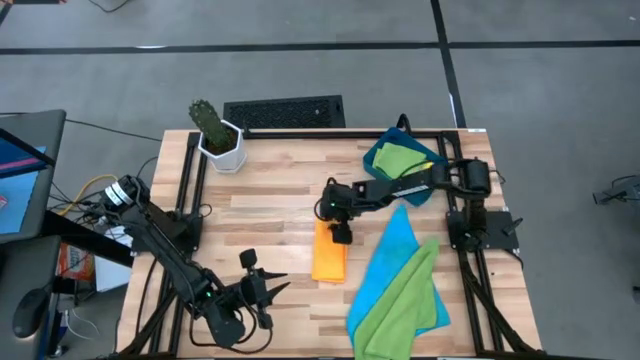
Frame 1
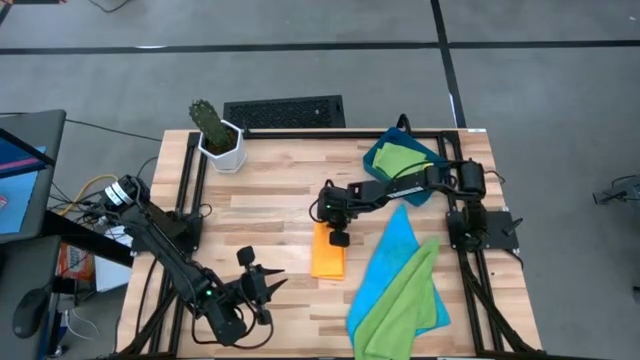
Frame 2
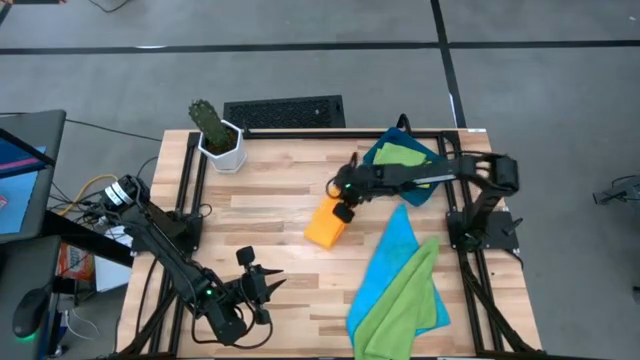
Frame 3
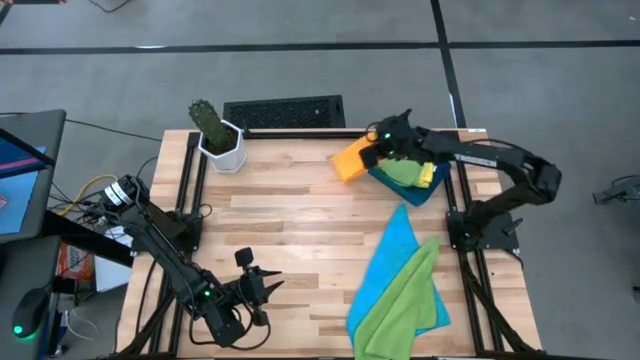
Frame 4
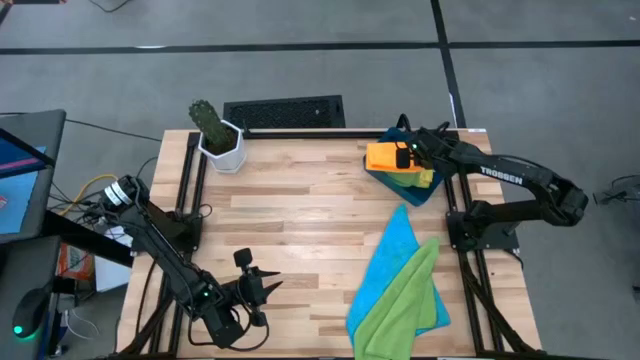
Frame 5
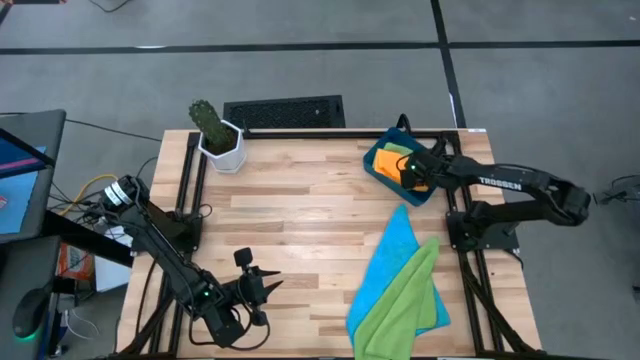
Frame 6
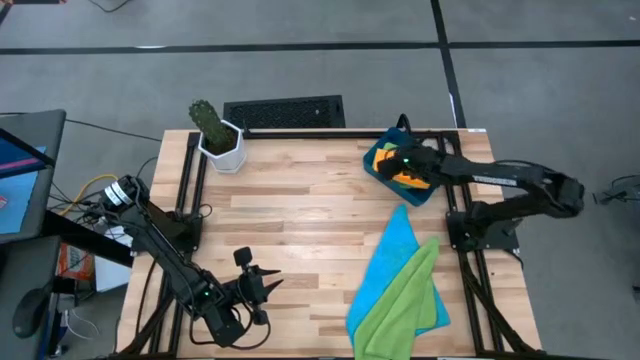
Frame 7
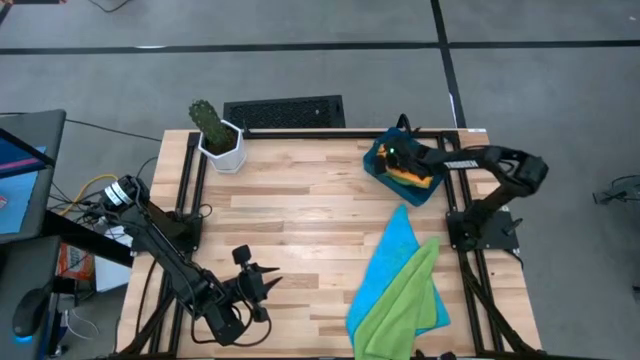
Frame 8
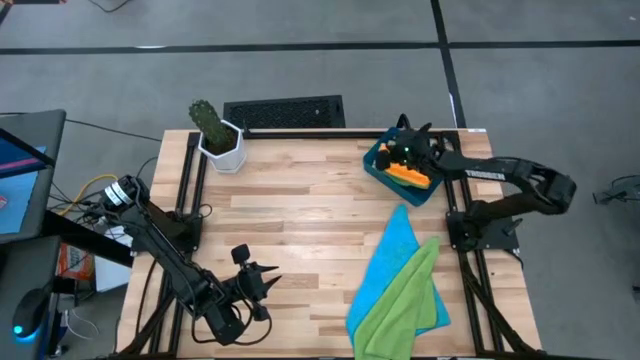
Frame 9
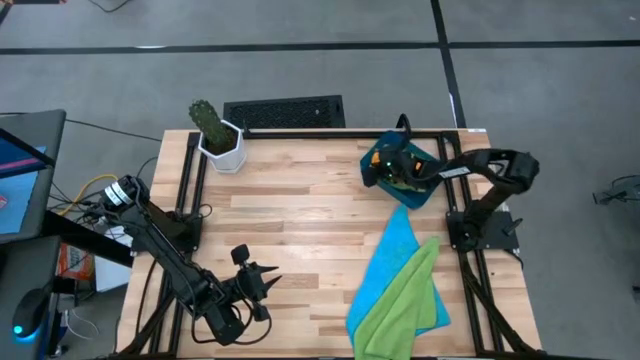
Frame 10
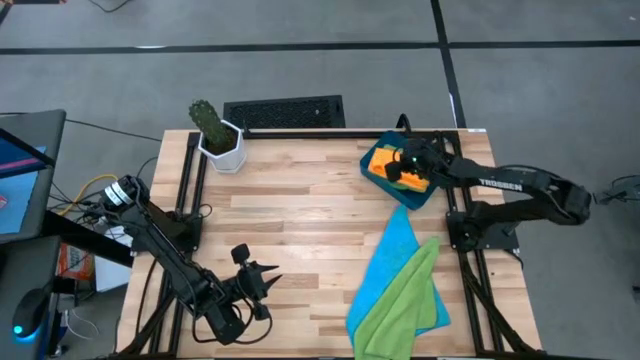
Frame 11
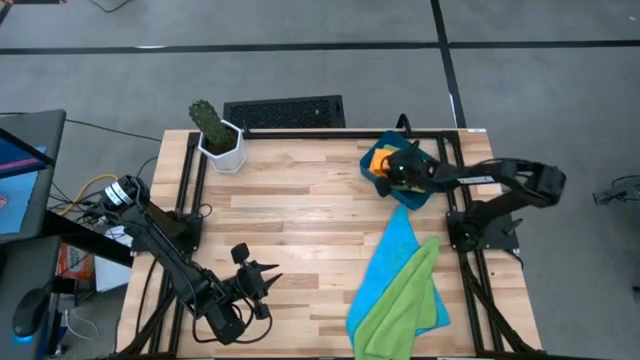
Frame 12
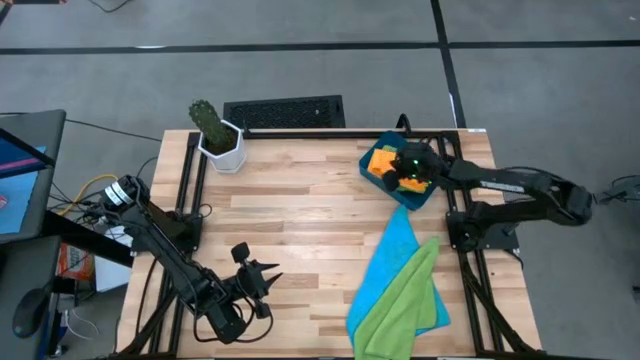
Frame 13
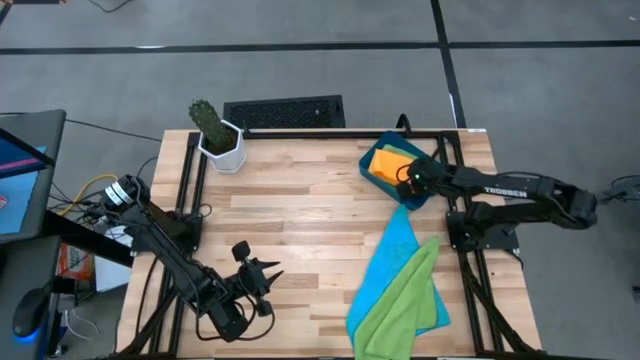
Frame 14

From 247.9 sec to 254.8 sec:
Task: Fold microfiber towels
Put the orange microfiber cloth into the blue bin

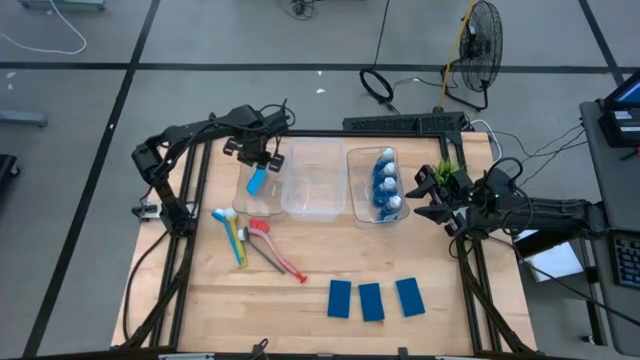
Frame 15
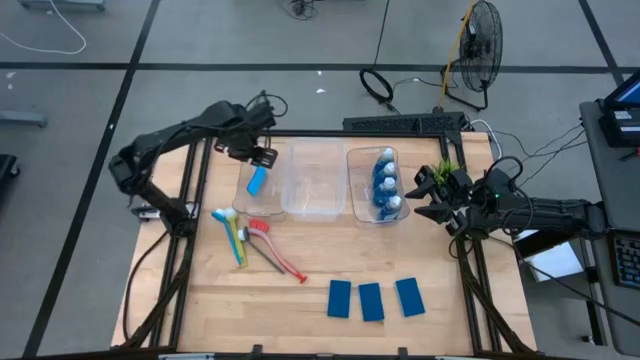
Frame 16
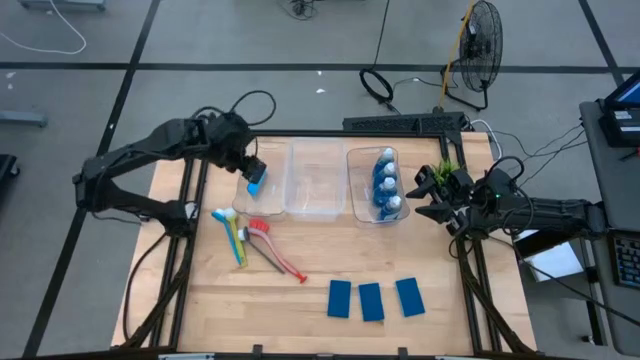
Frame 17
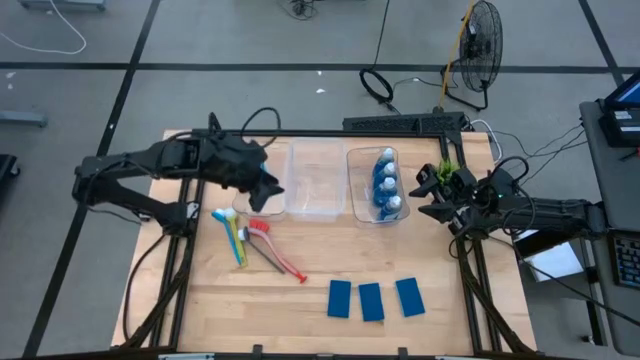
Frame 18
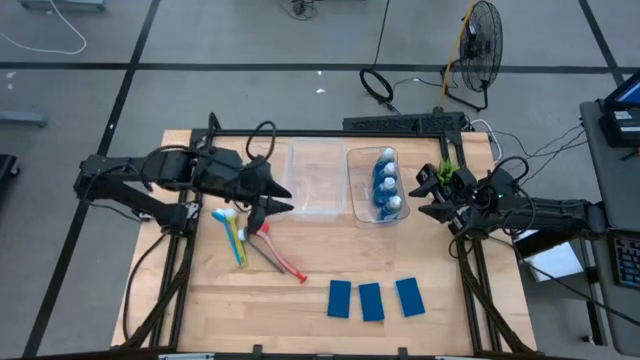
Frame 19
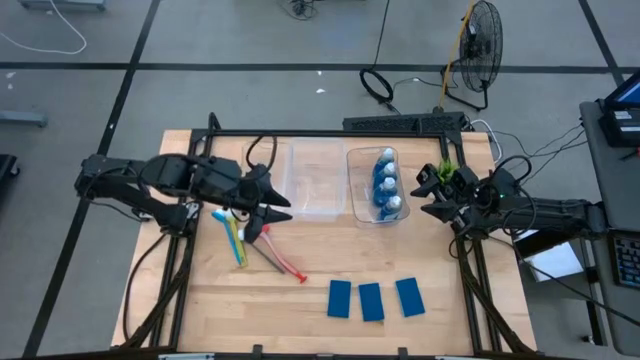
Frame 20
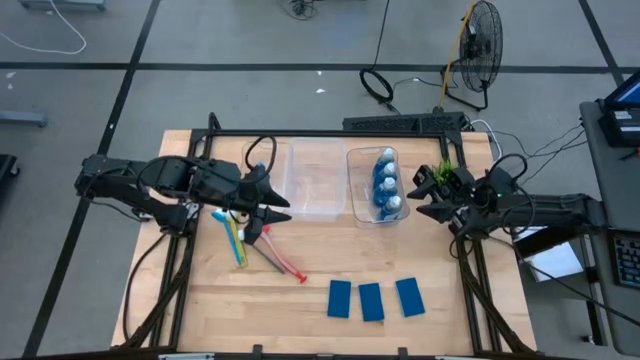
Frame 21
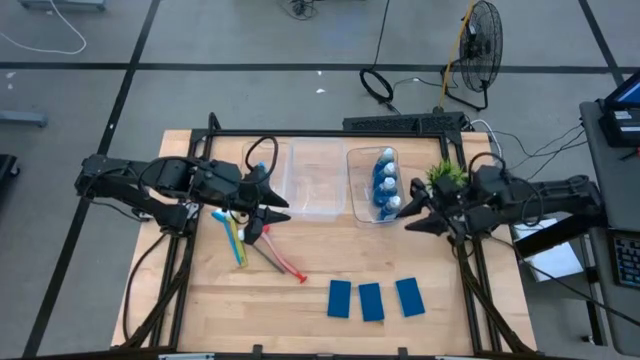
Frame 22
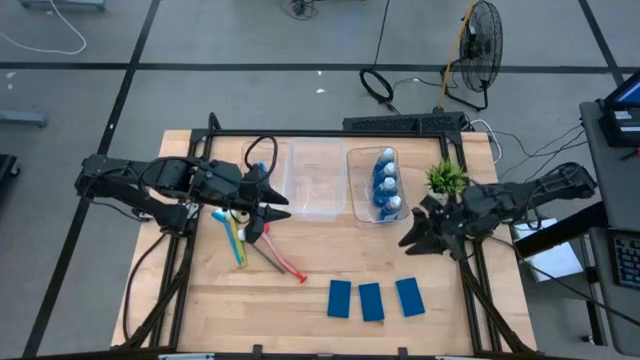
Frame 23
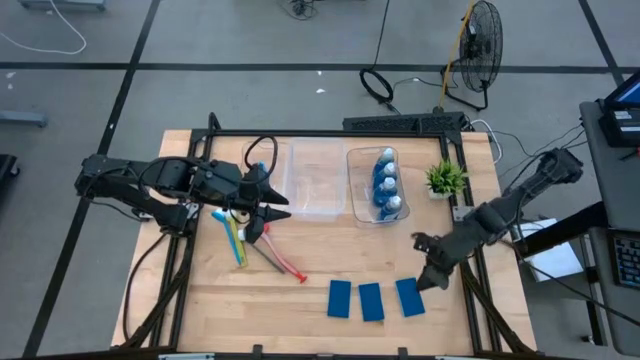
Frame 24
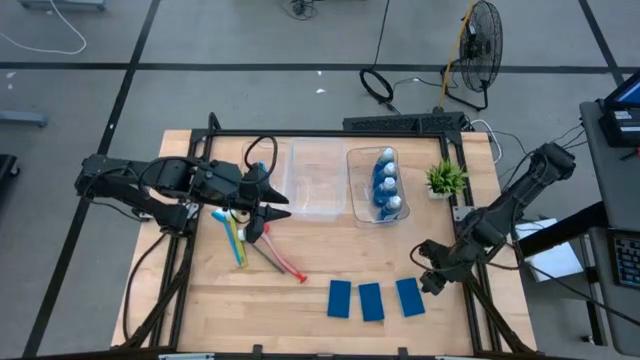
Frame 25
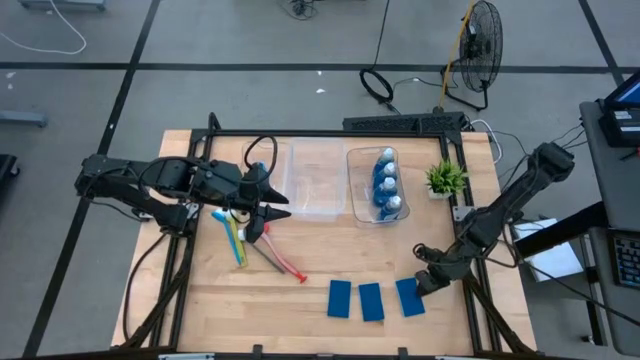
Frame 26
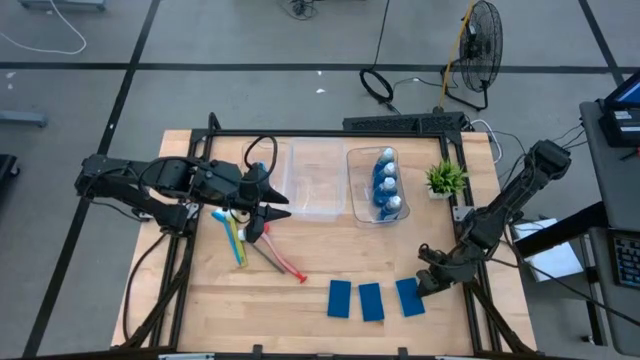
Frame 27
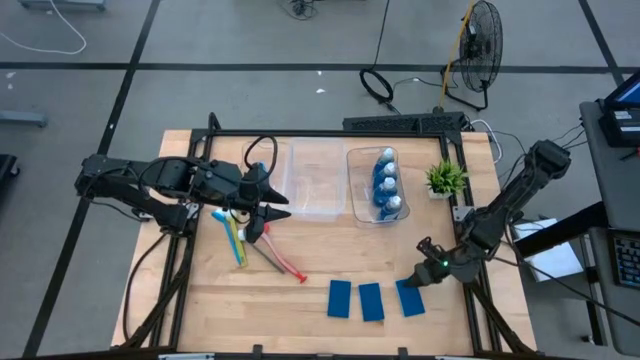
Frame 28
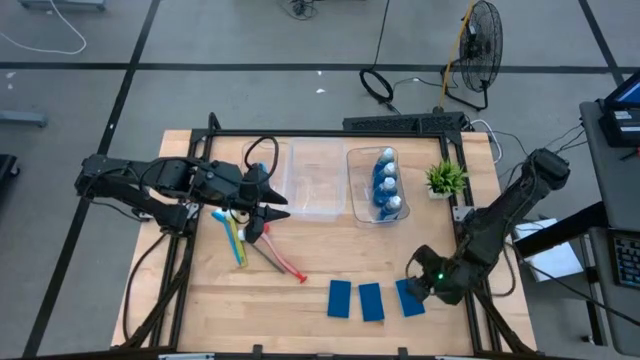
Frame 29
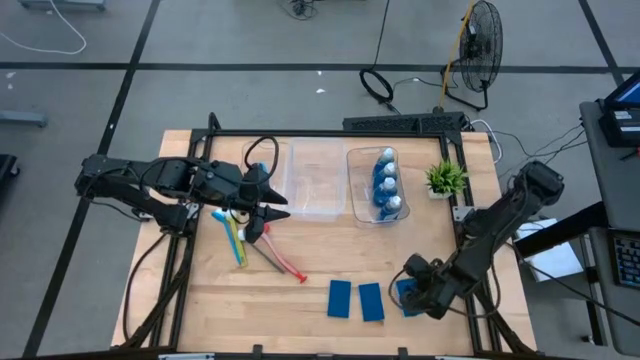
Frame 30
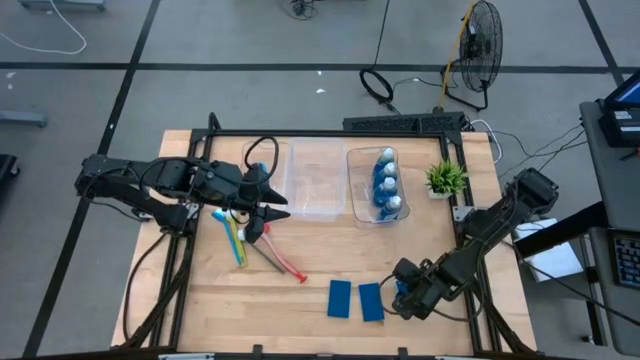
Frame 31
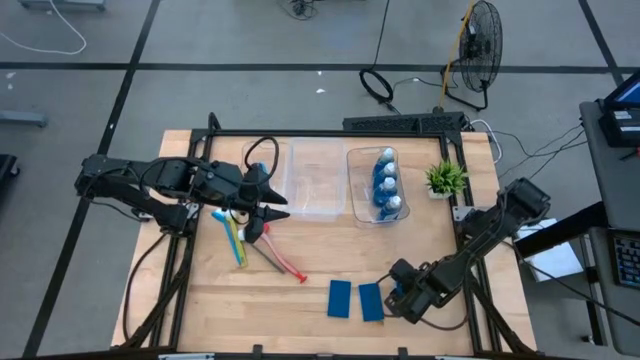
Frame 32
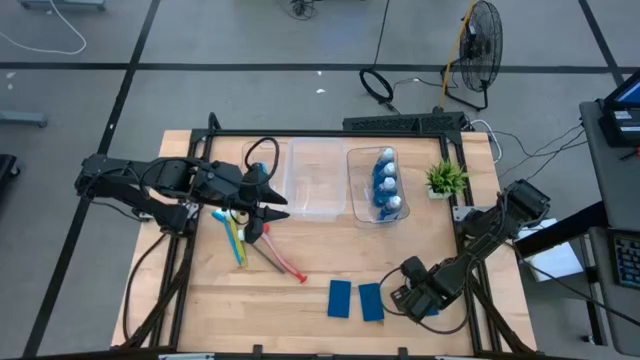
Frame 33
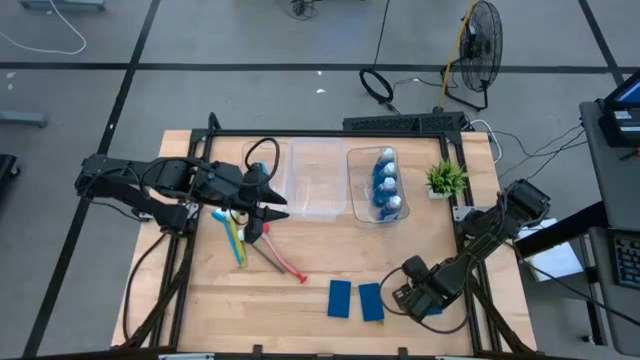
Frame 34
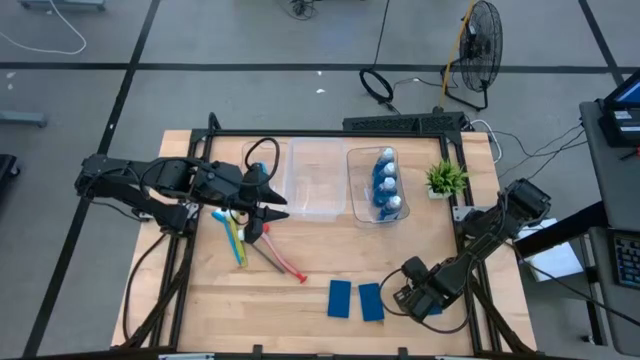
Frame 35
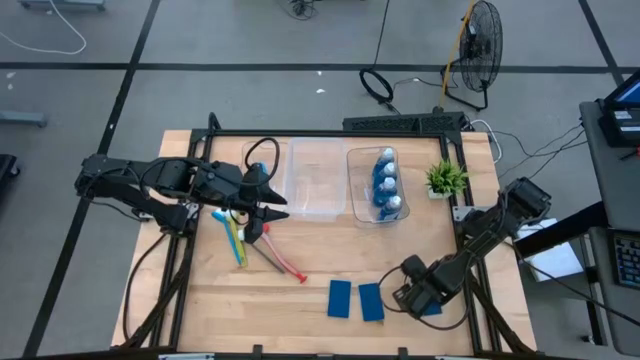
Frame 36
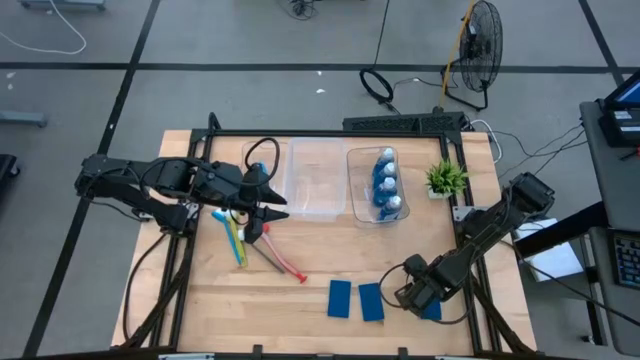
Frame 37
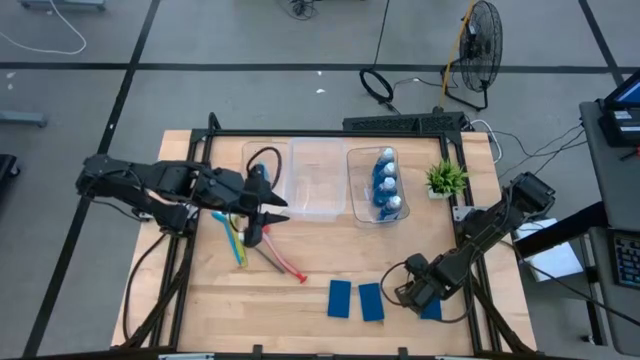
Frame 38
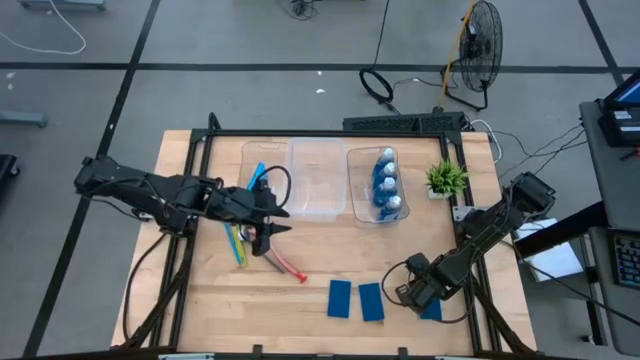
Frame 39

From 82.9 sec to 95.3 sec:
Task: Pick & Place Kitchen Sink Supplies
Put the blue sponge into the left transparent bin
